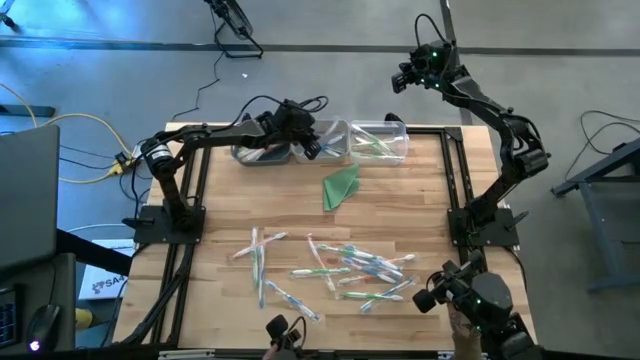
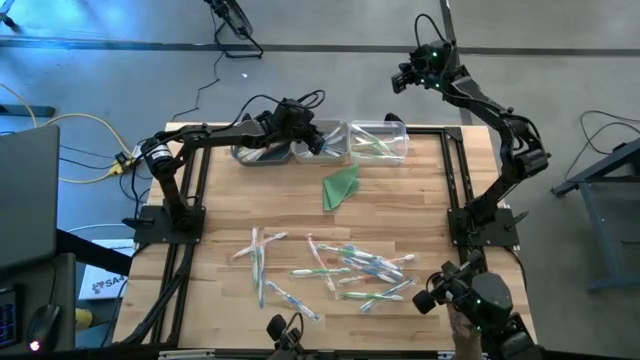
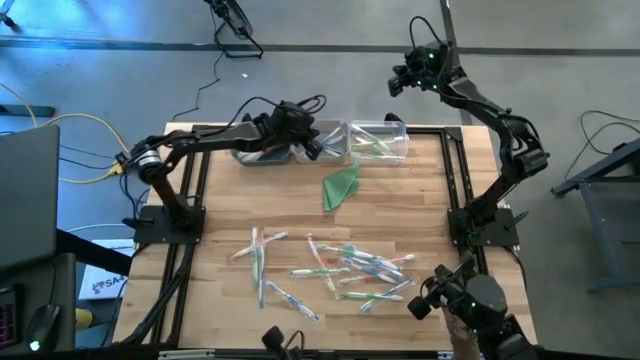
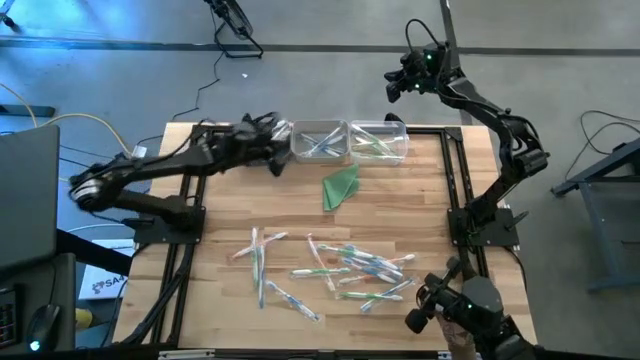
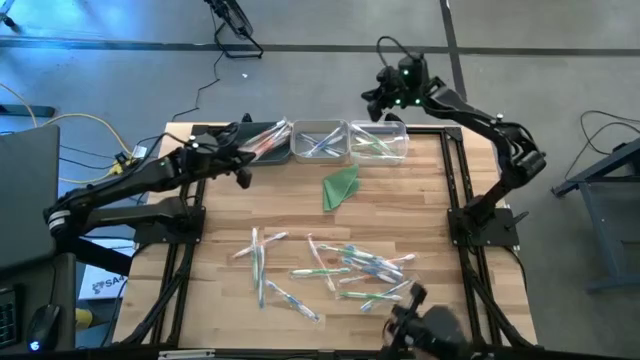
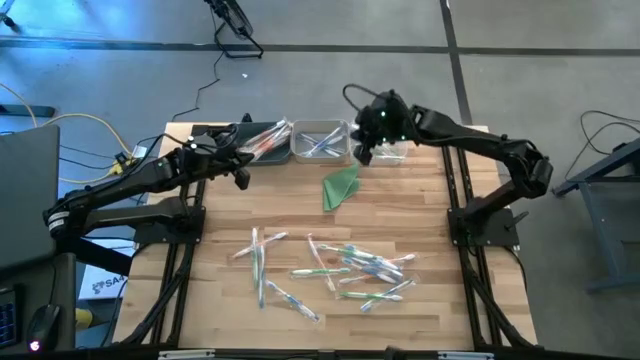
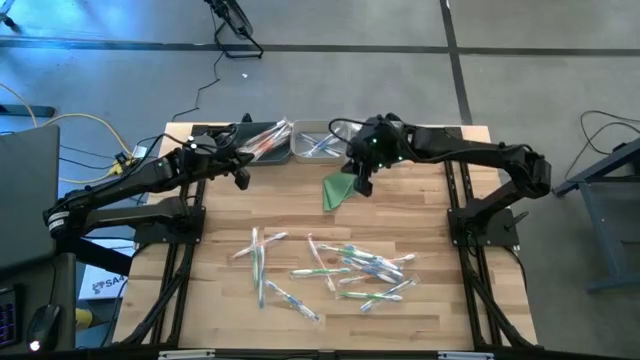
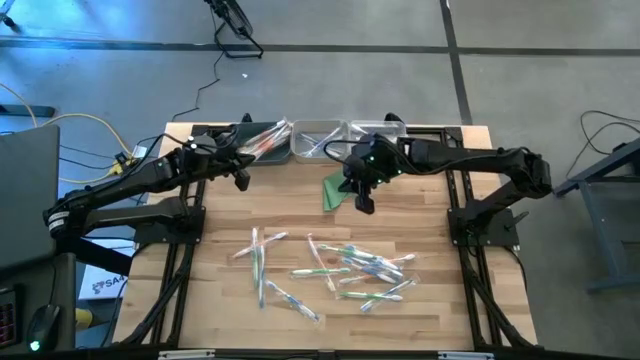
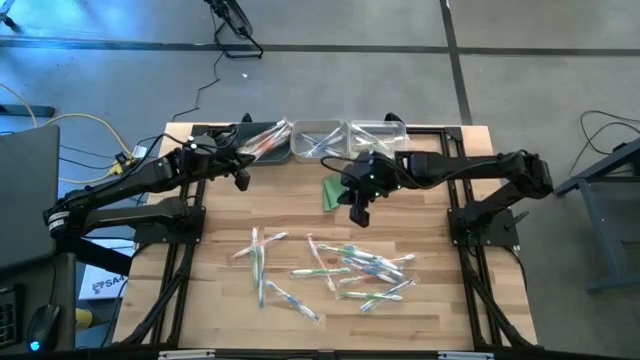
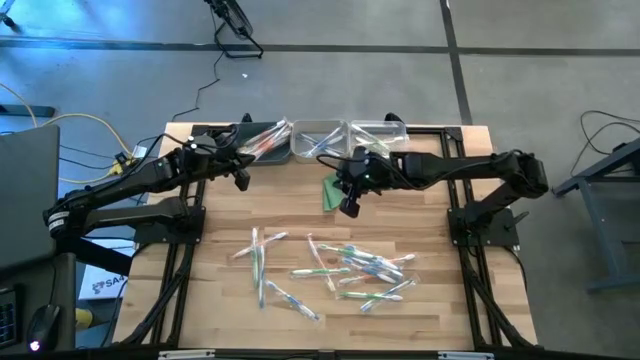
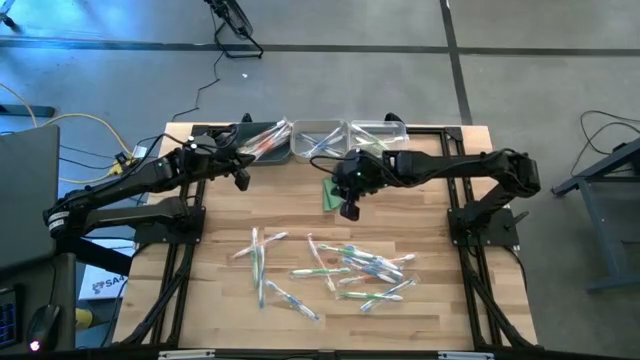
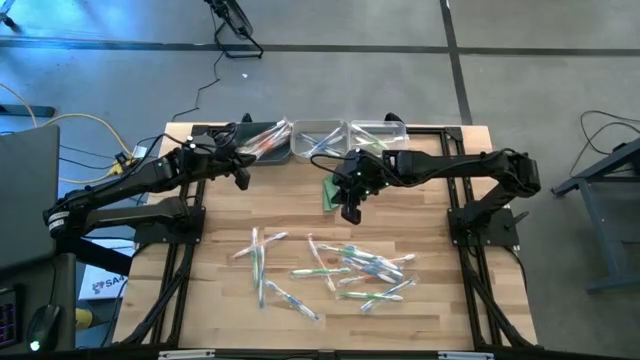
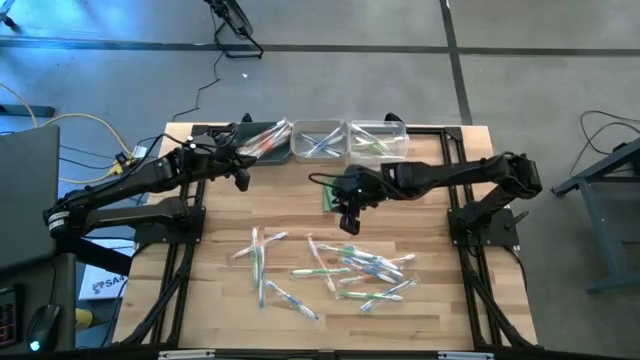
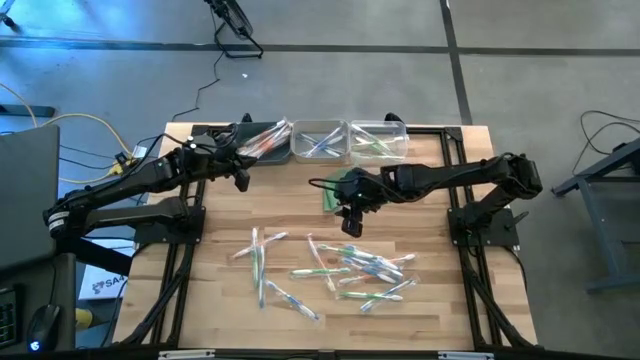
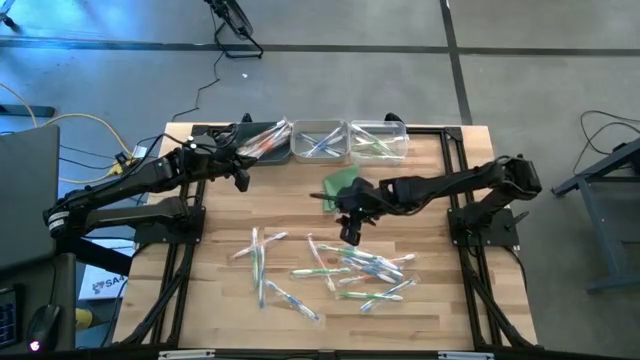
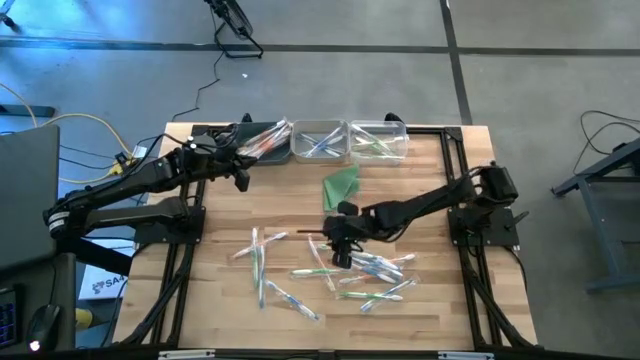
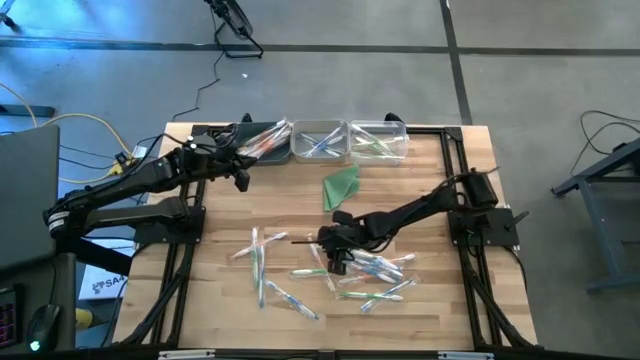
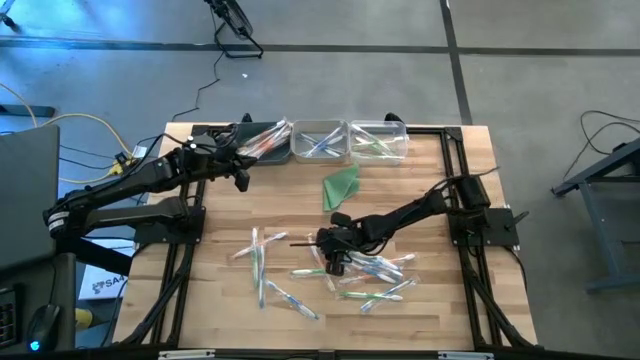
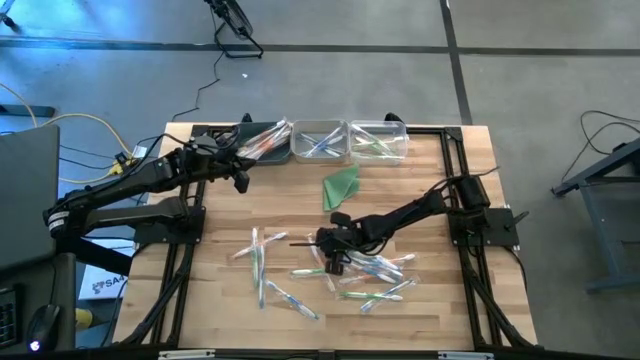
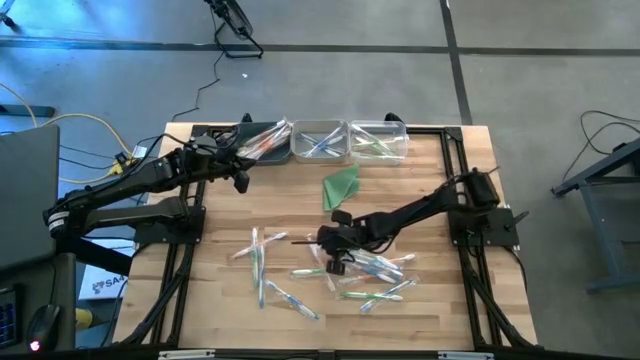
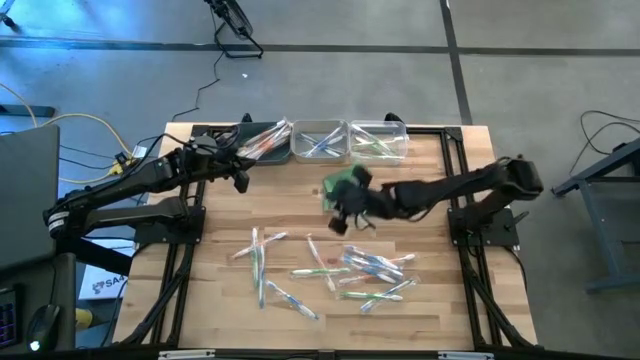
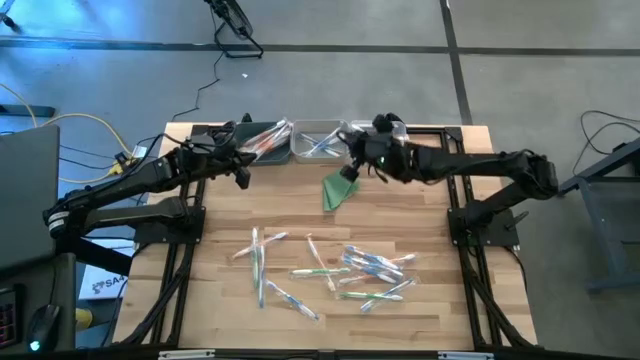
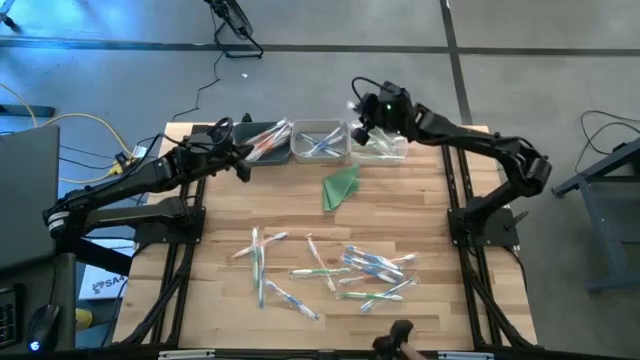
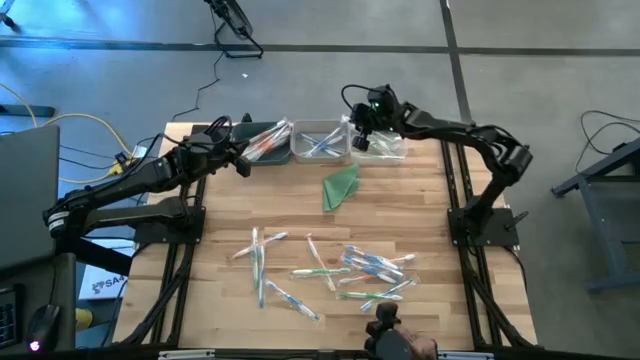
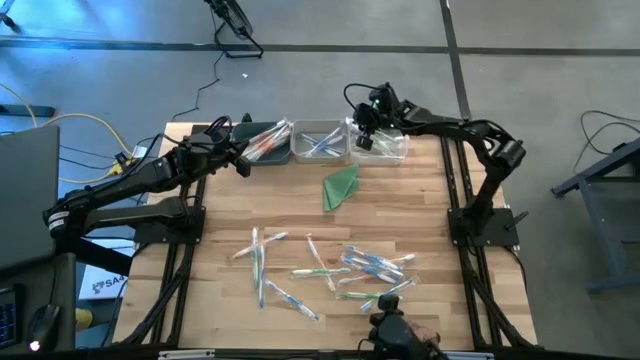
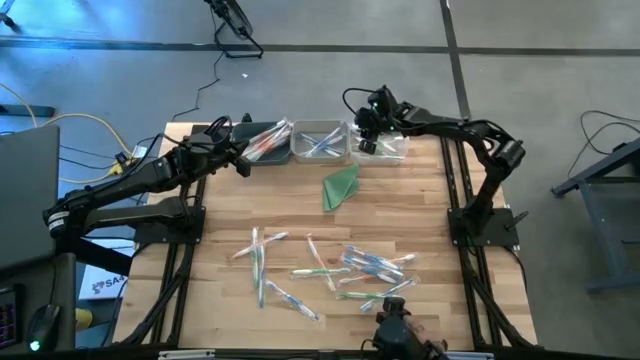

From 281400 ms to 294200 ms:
Task: Pick & Place Toothbrushes
Put the green toothbrush into the transparent bin

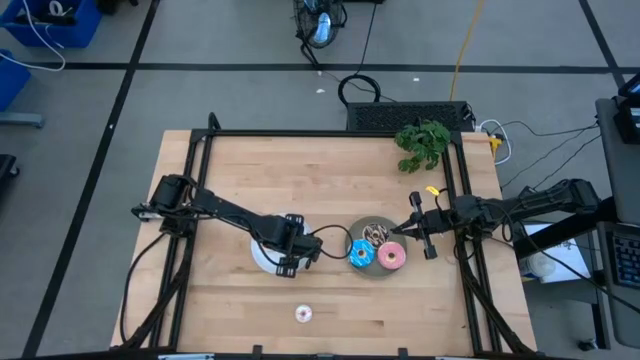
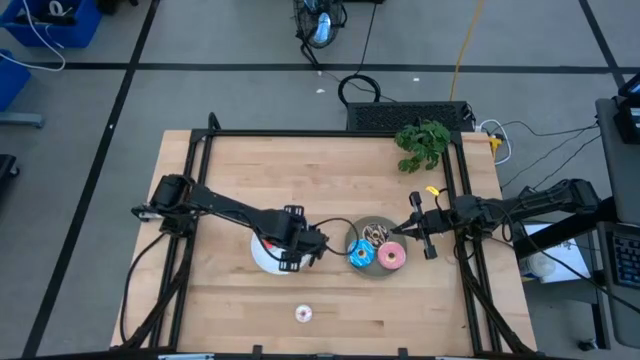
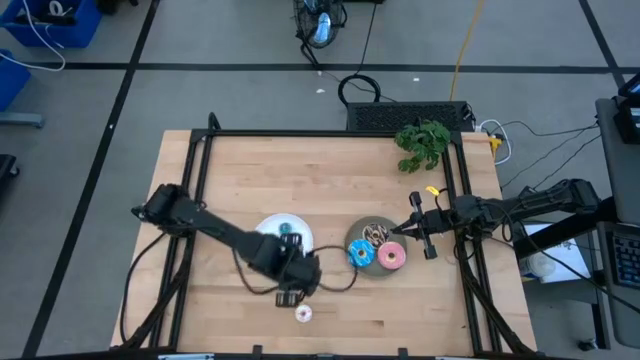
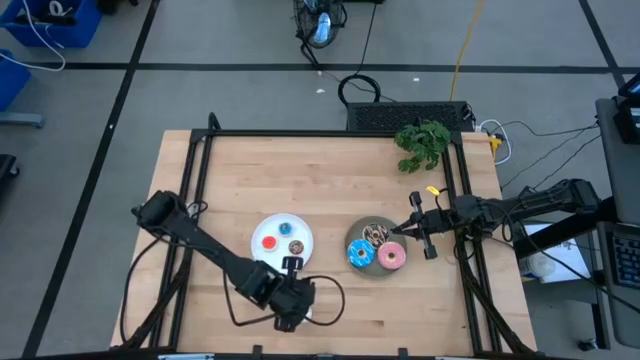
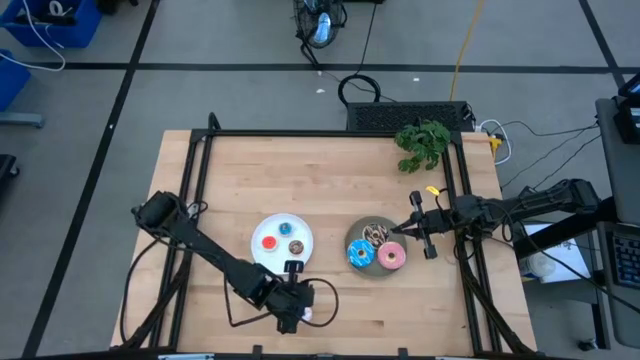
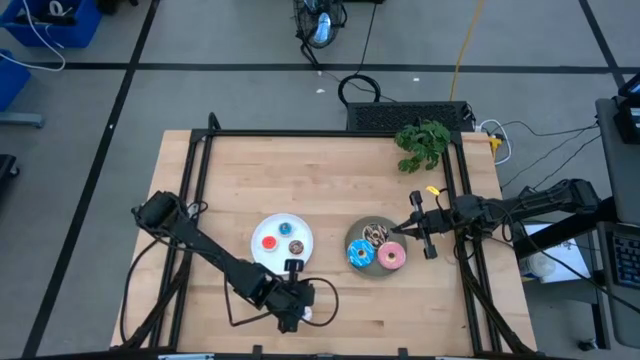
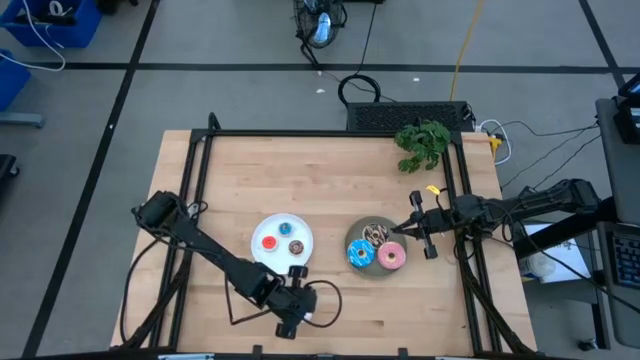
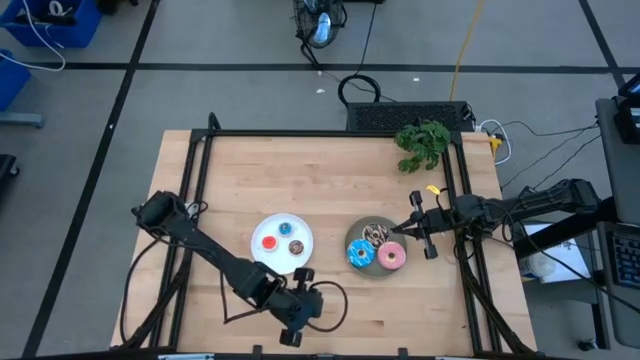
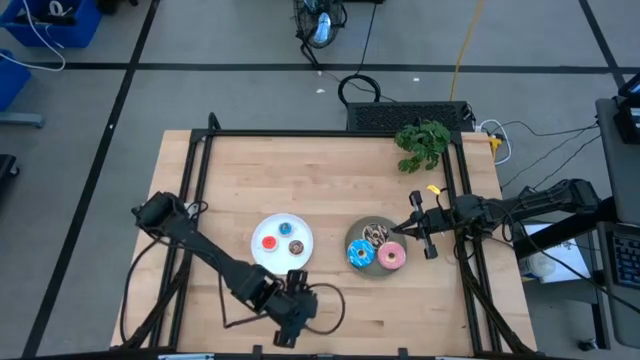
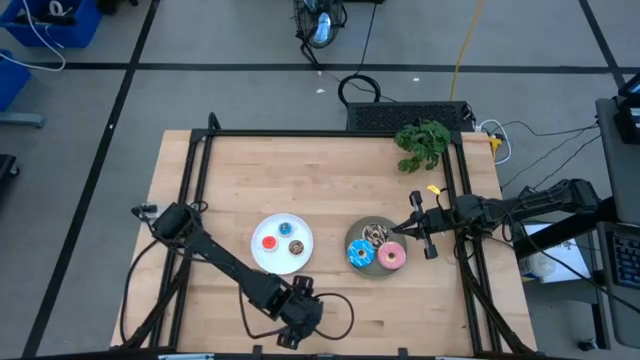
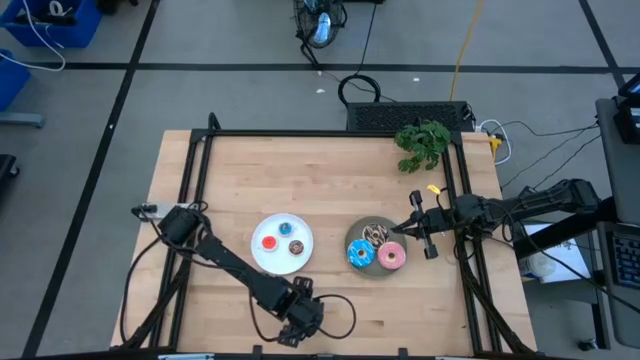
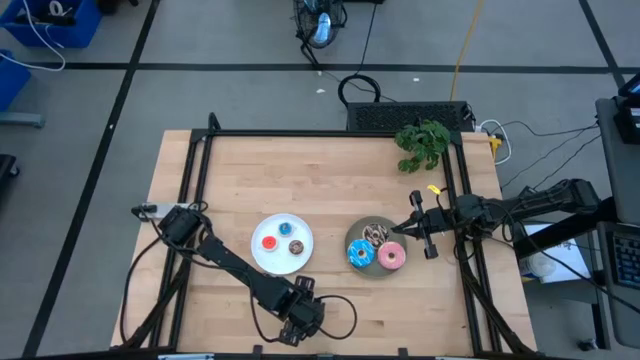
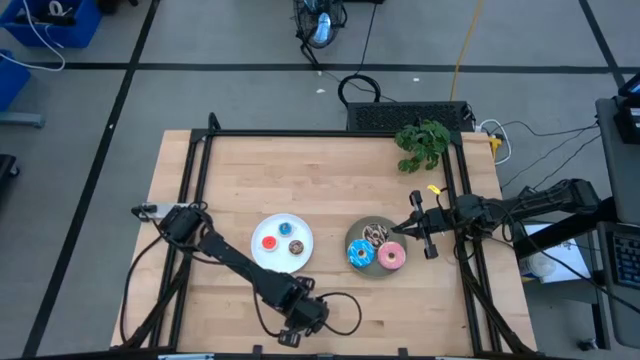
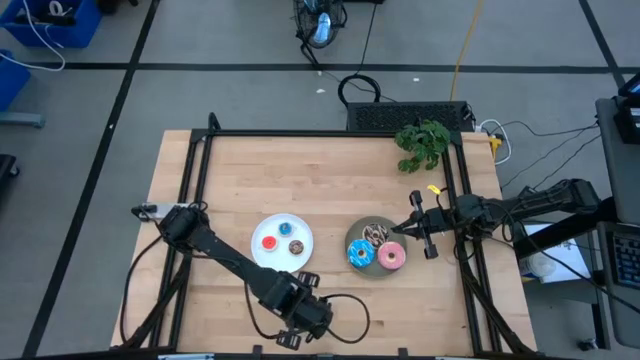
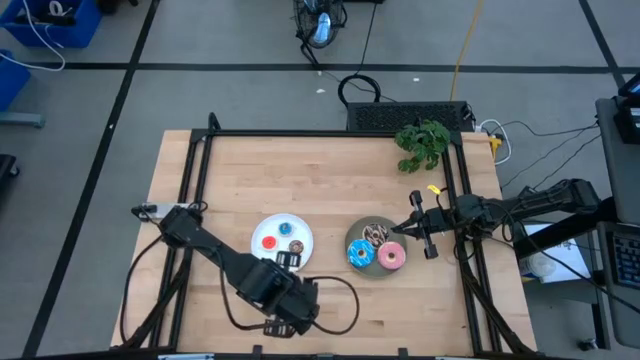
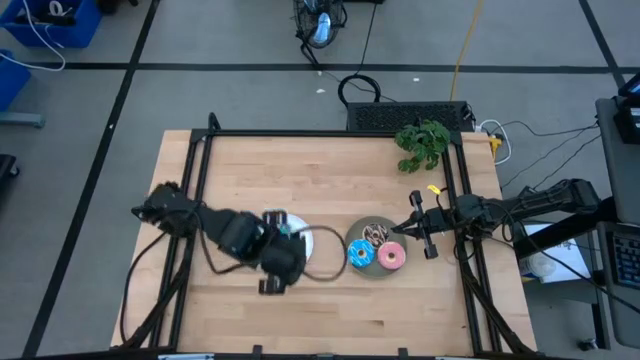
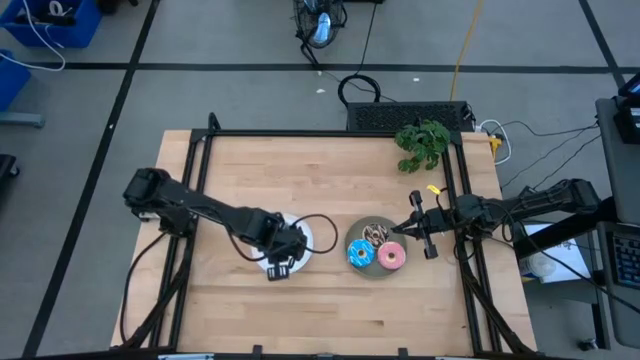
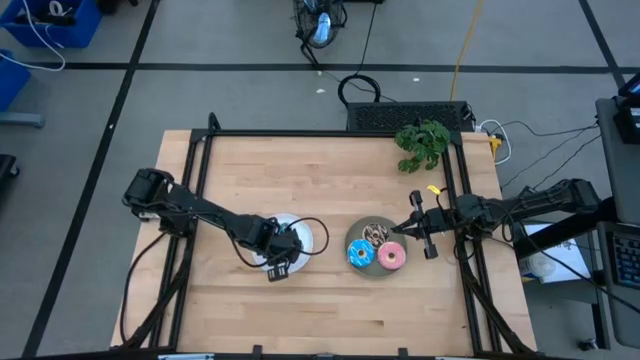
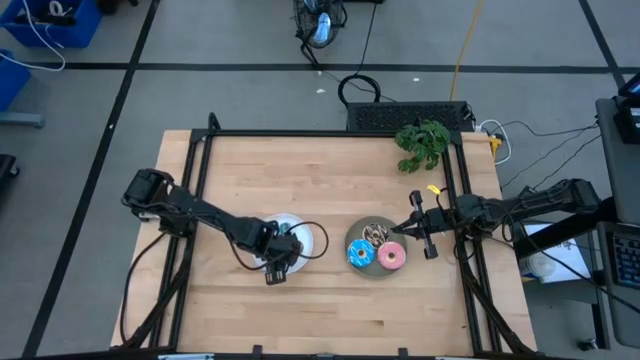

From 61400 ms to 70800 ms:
Task: Pick & Place donuts
Put the small white donut on the white plate
